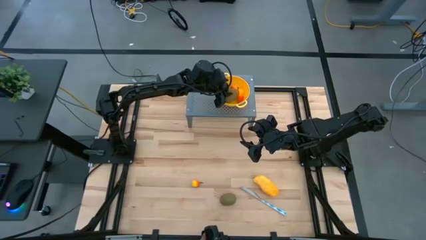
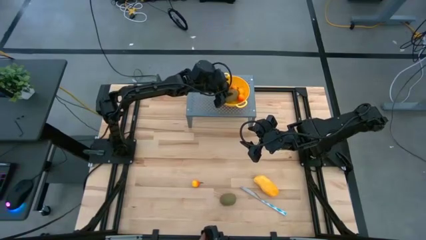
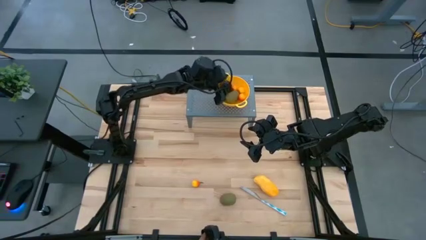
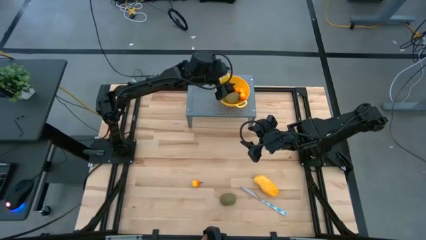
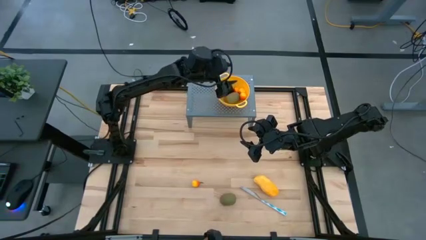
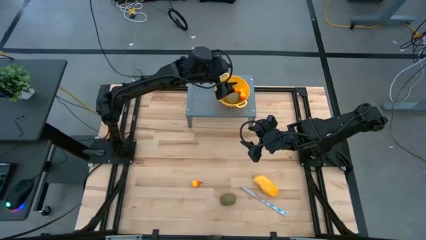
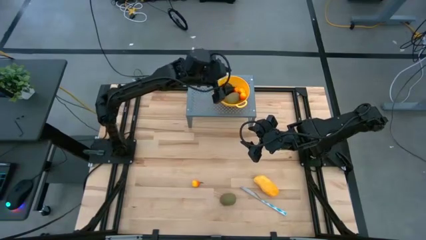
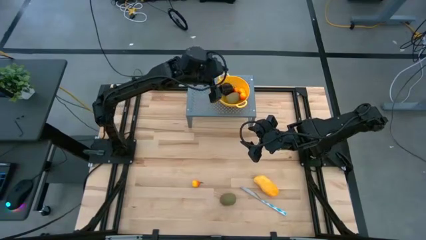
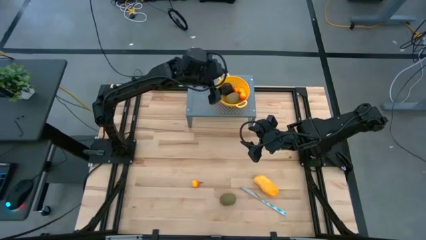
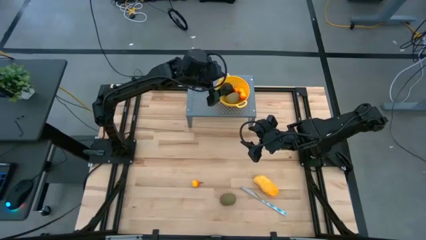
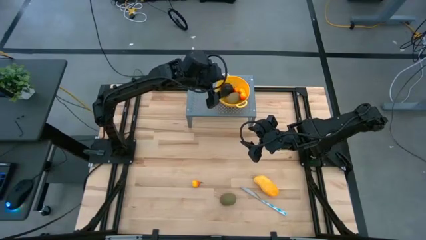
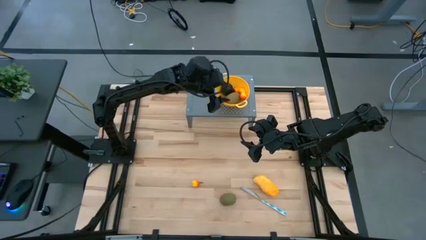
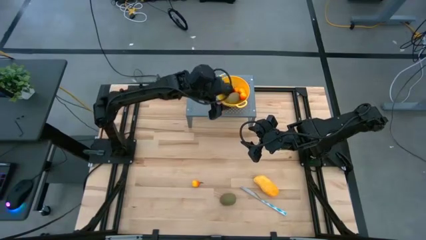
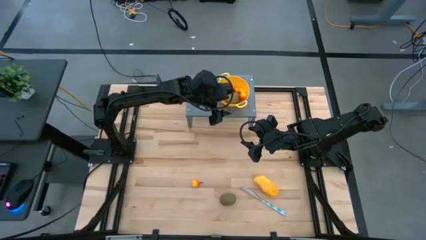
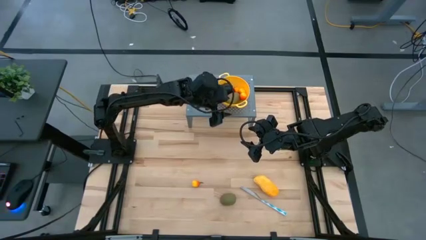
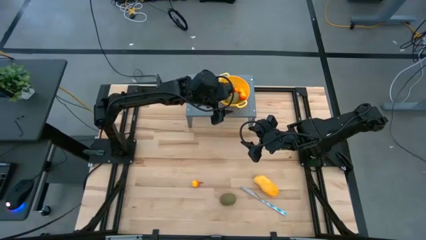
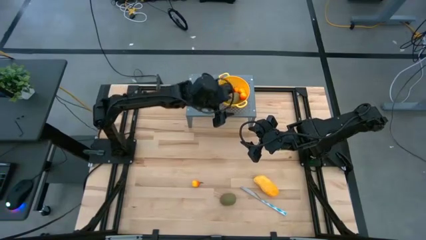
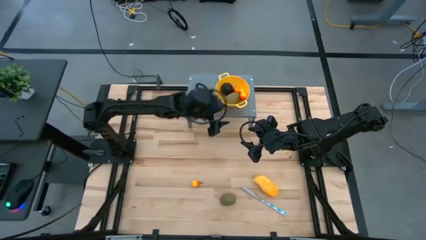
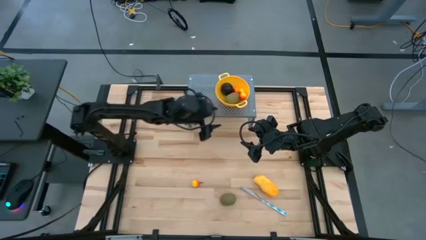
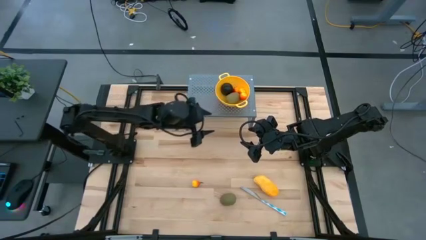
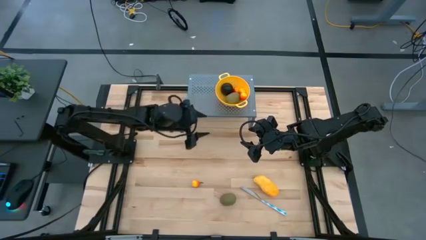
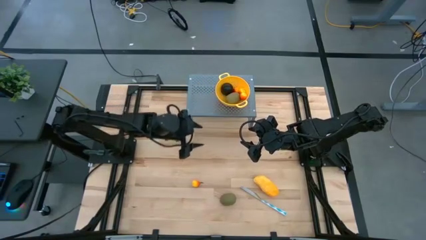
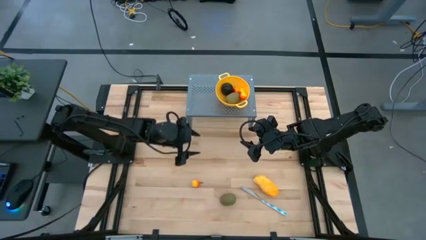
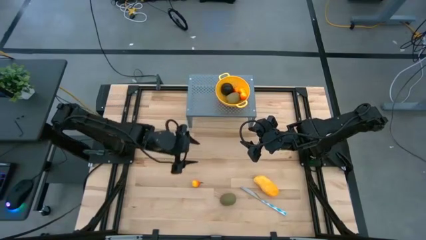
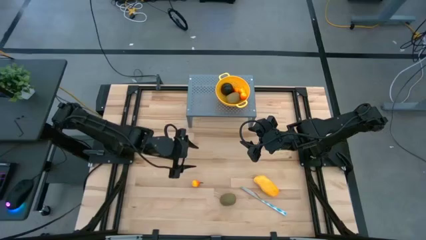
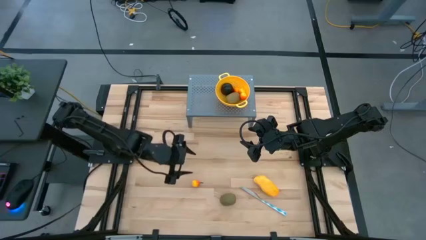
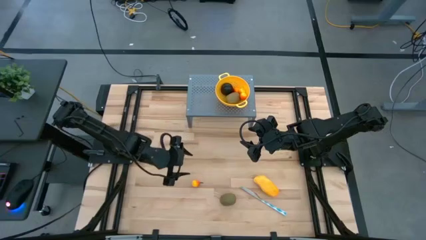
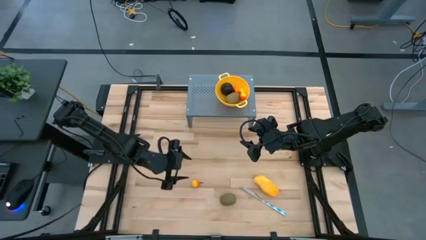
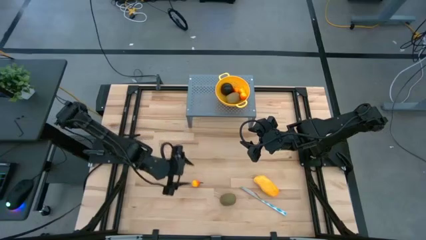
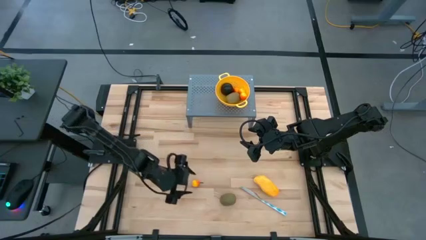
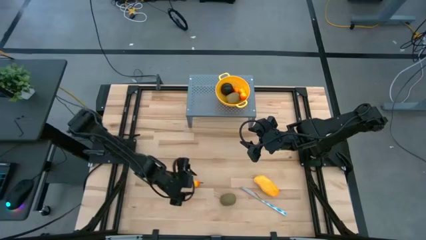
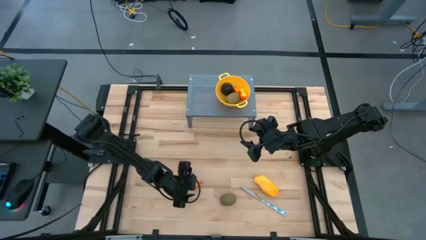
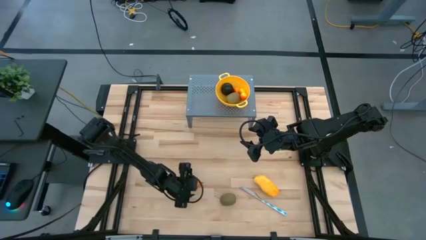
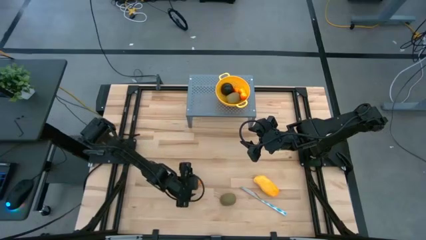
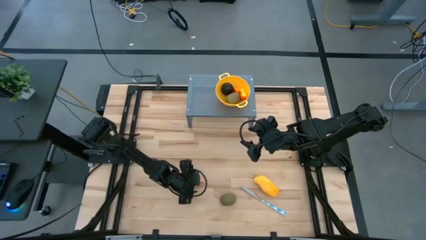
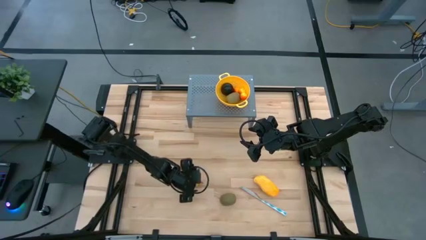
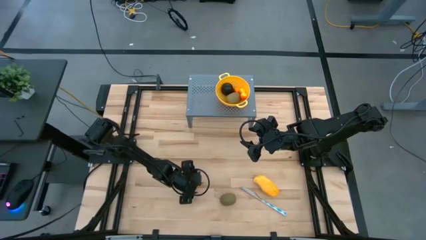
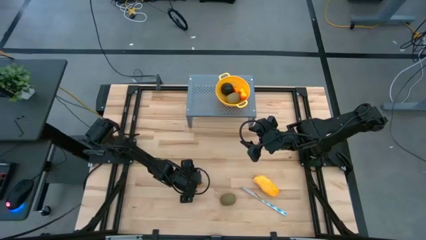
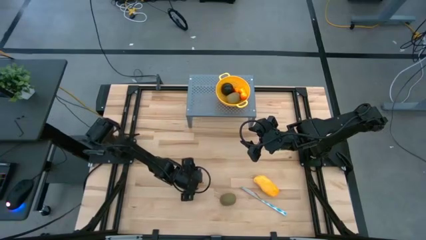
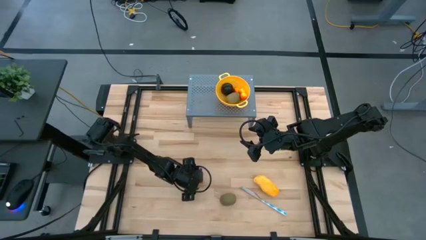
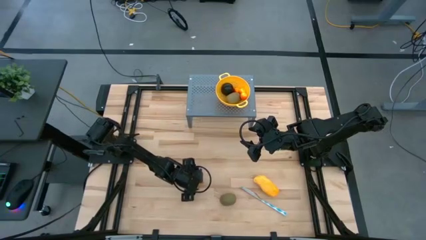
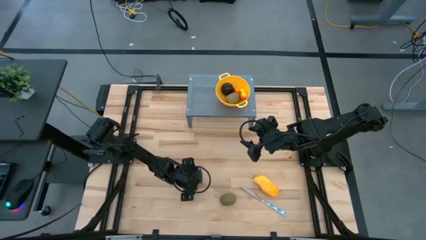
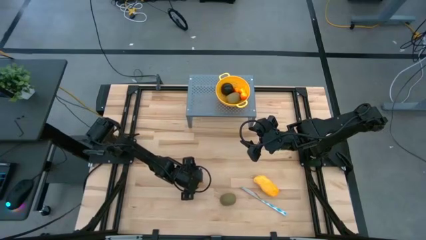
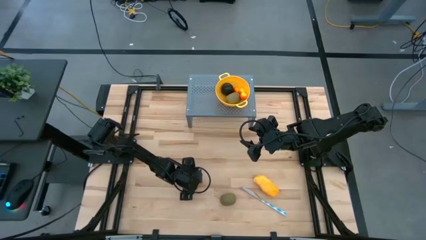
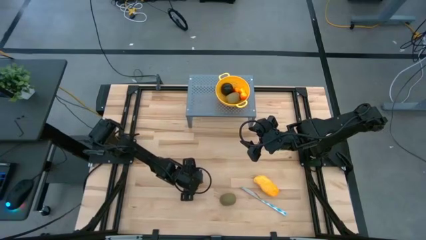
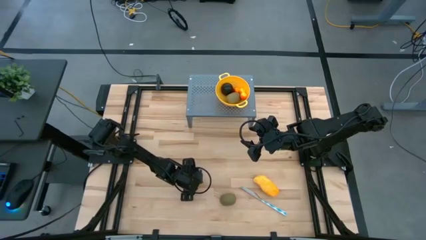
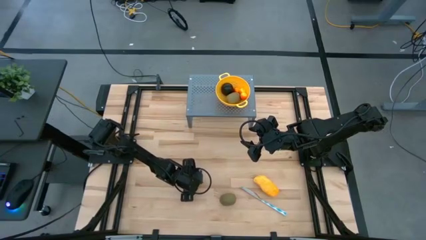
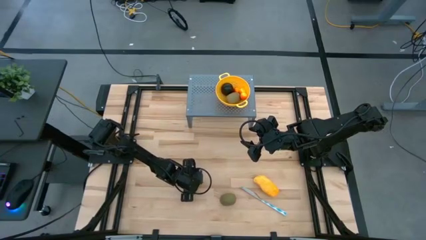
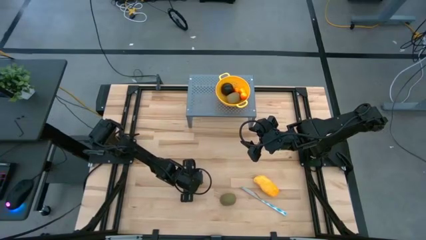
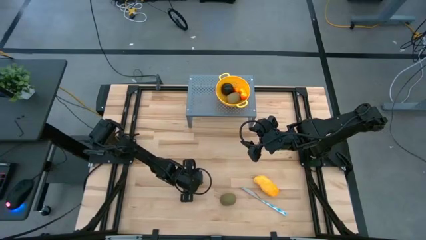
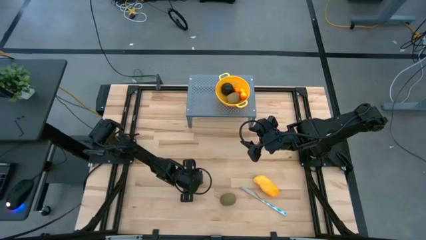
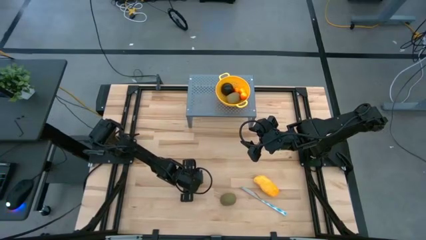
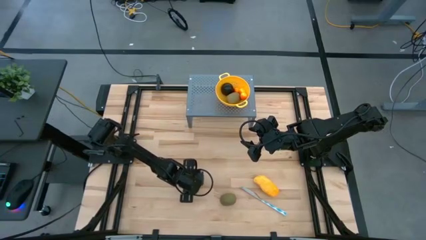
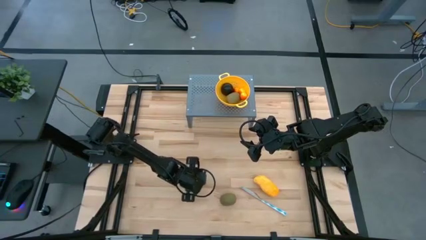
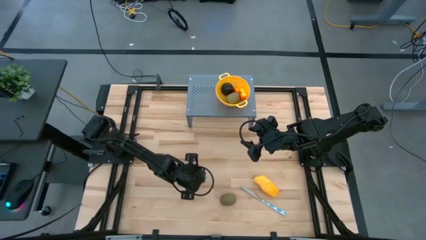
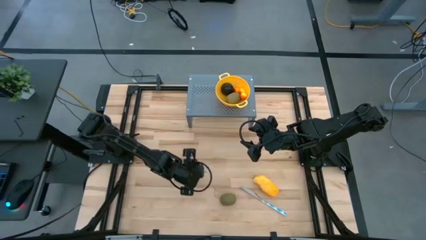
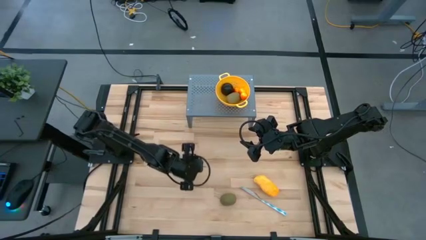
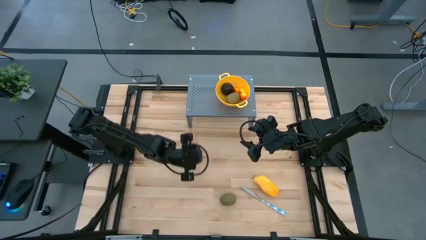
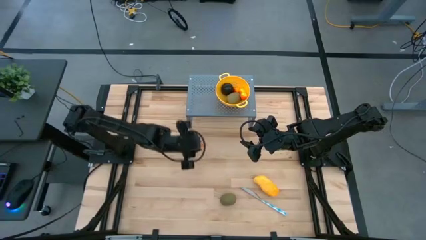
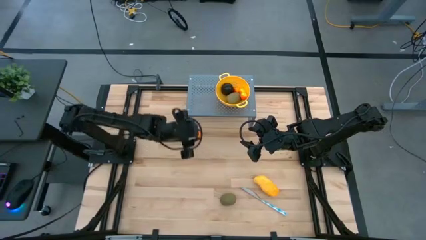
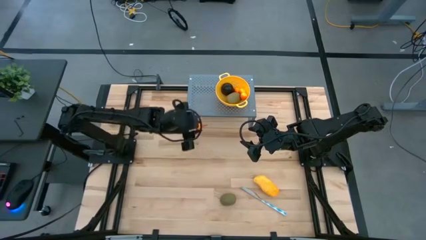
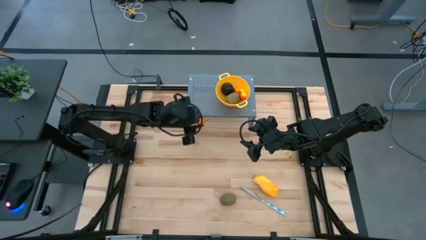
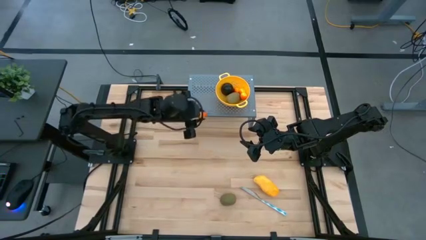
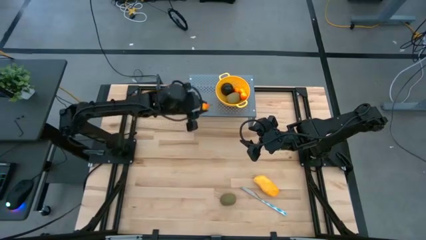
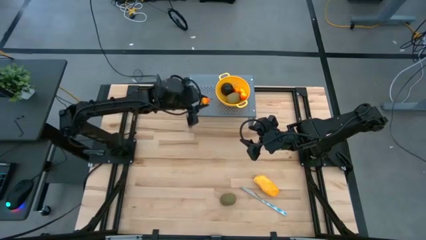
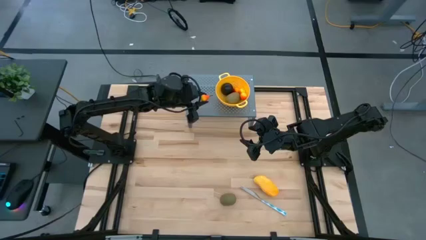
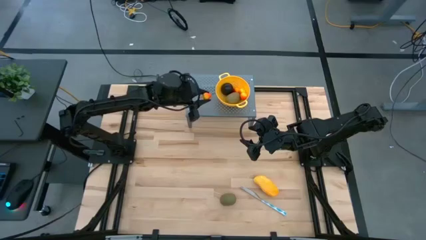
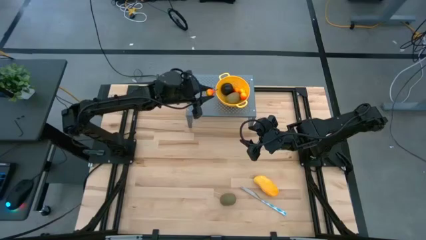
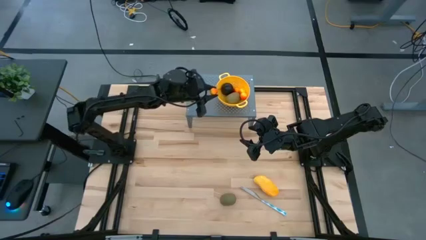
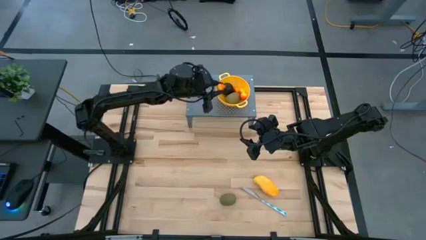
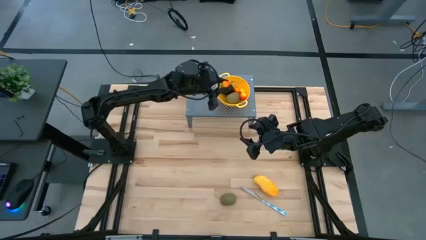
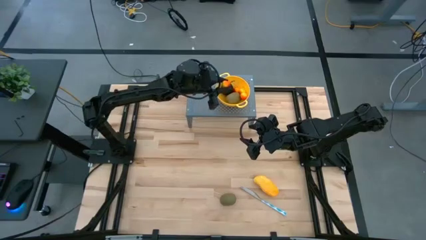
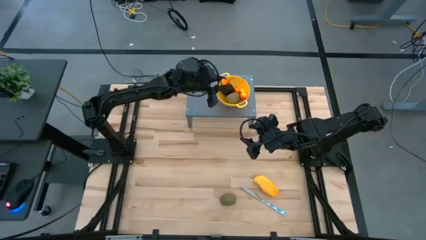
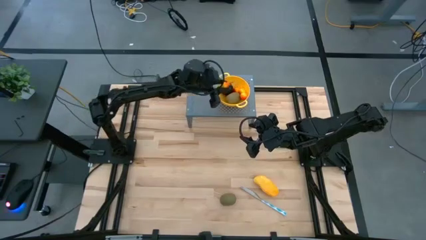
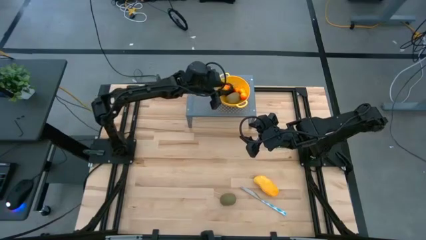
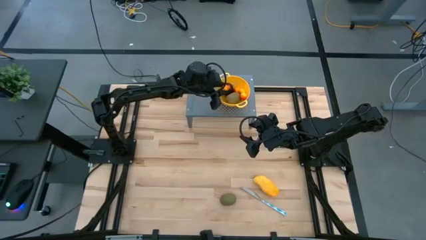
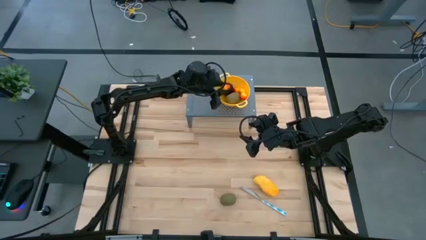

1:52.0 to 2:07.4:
Task: Pick & Place Fruit
Put the peach into the yellow strainer bowl on the shelf
